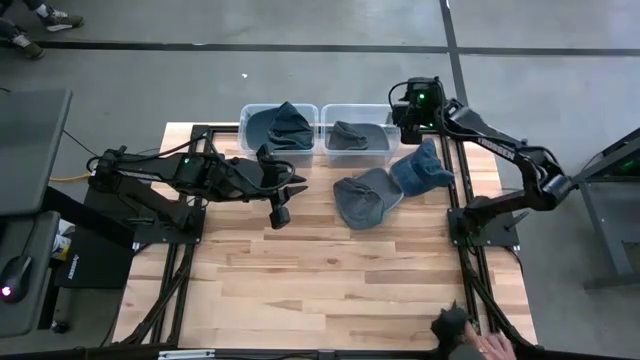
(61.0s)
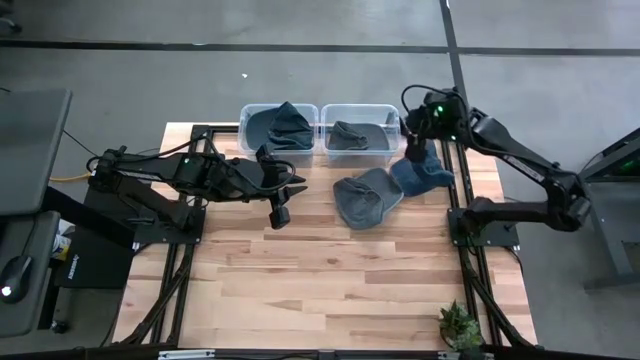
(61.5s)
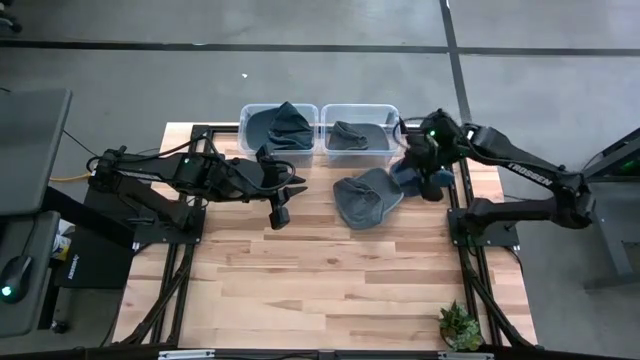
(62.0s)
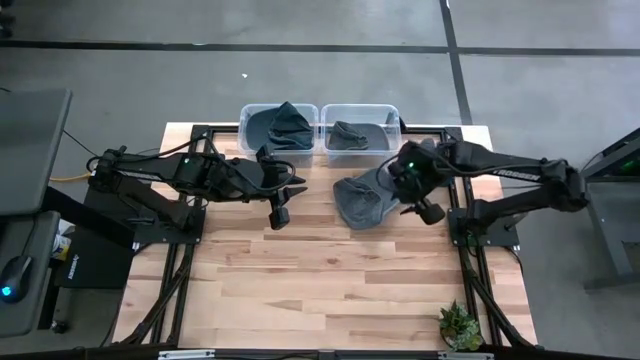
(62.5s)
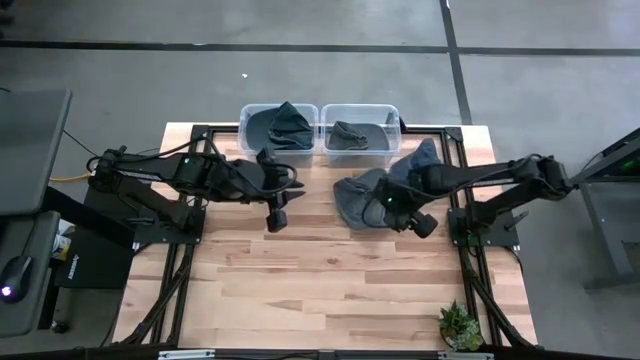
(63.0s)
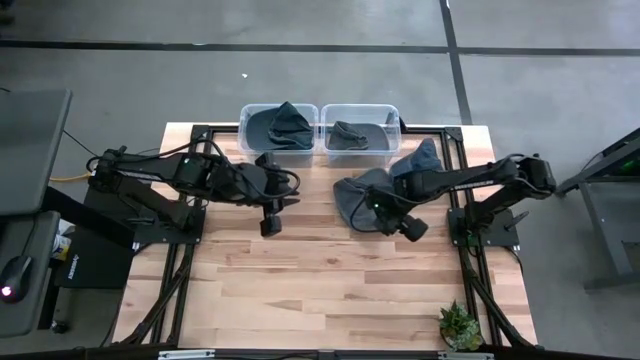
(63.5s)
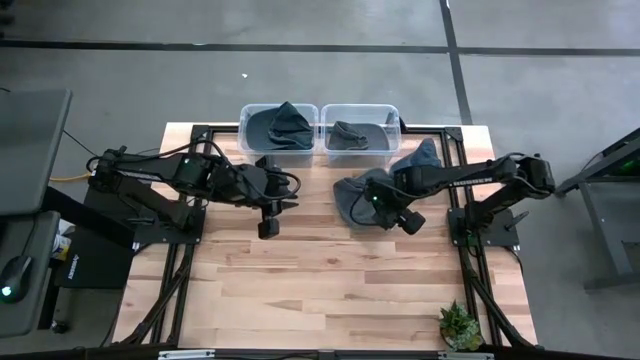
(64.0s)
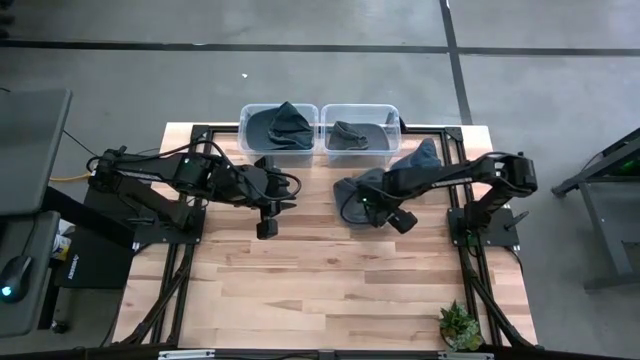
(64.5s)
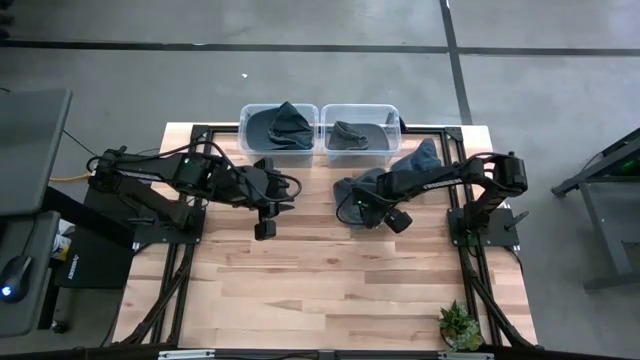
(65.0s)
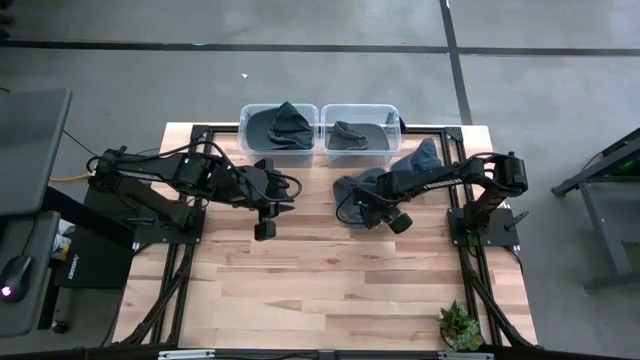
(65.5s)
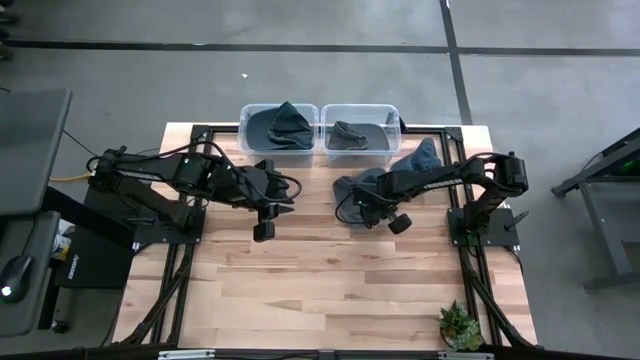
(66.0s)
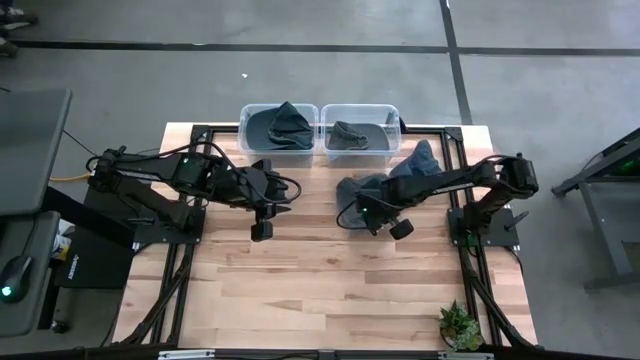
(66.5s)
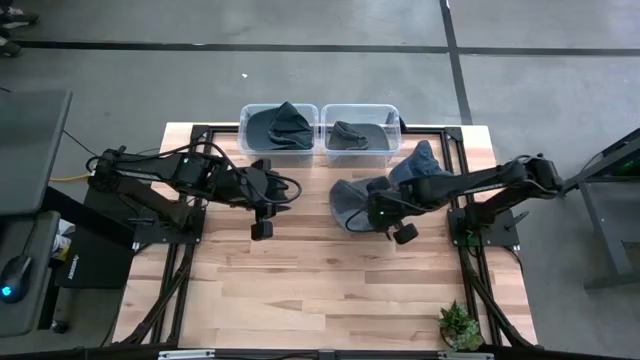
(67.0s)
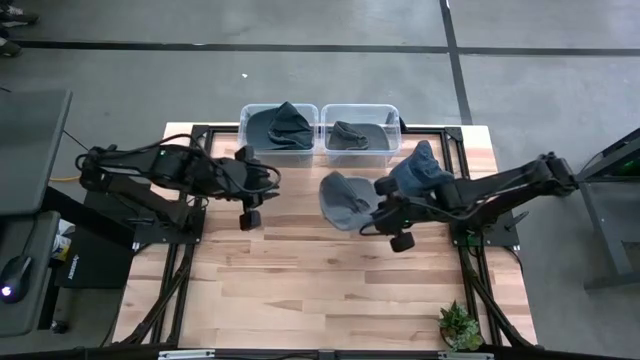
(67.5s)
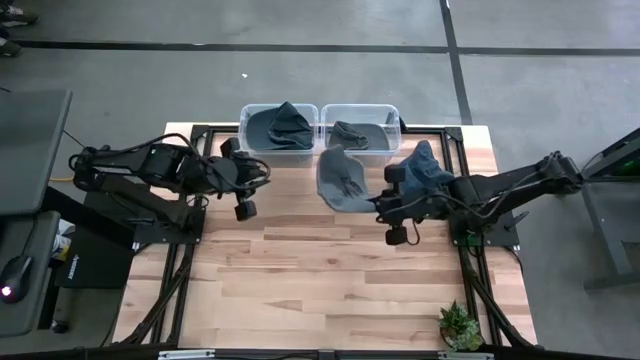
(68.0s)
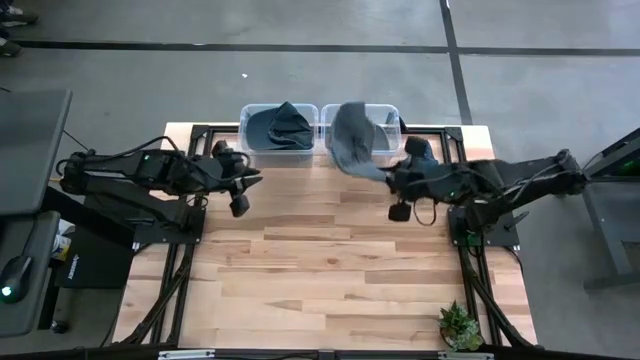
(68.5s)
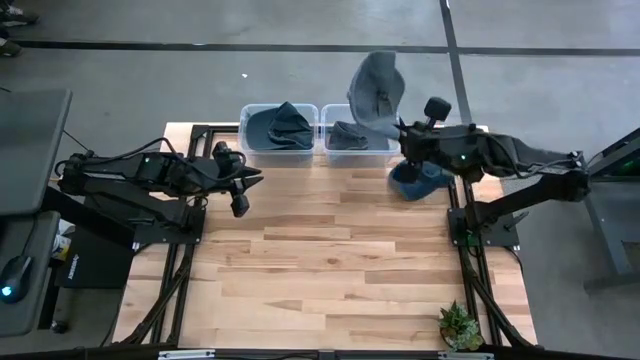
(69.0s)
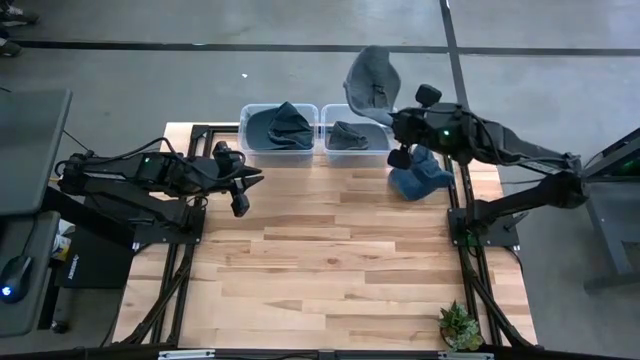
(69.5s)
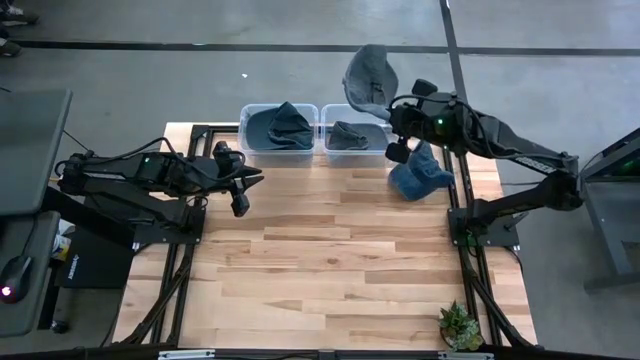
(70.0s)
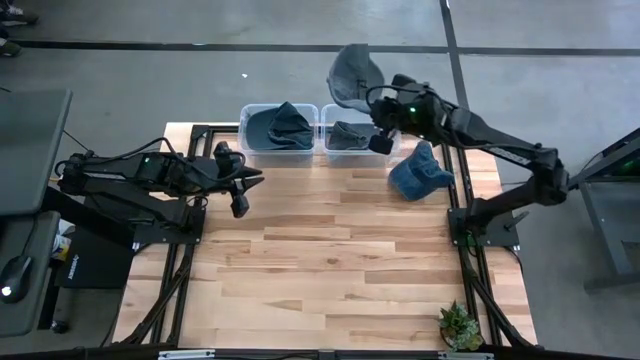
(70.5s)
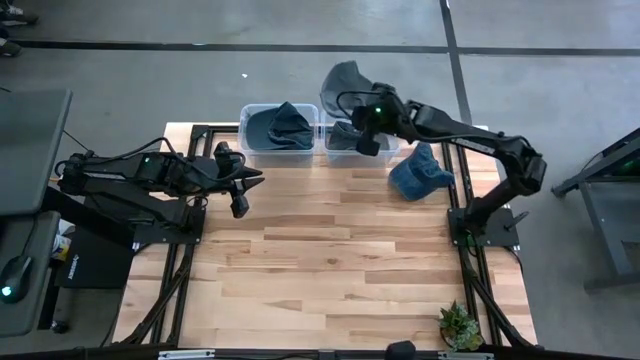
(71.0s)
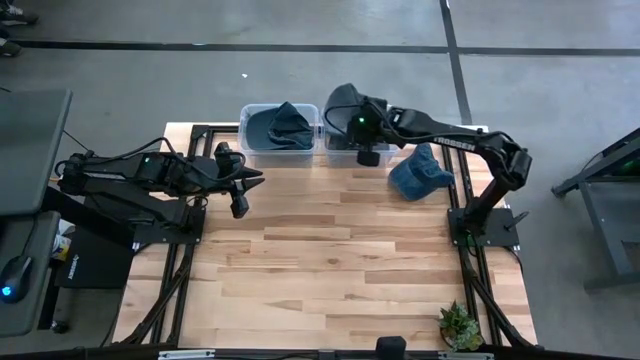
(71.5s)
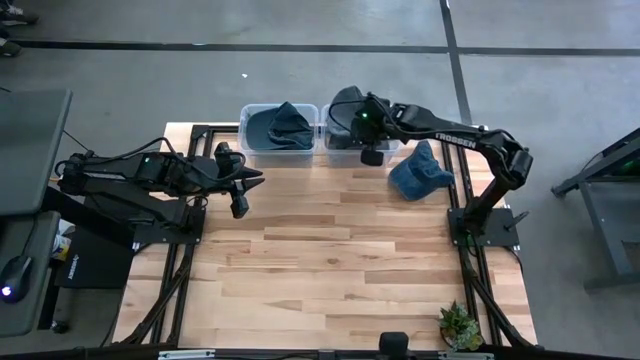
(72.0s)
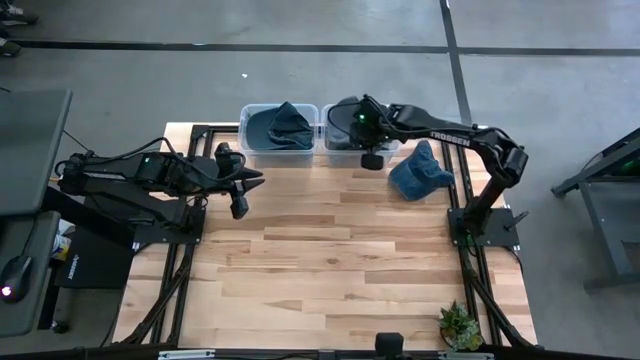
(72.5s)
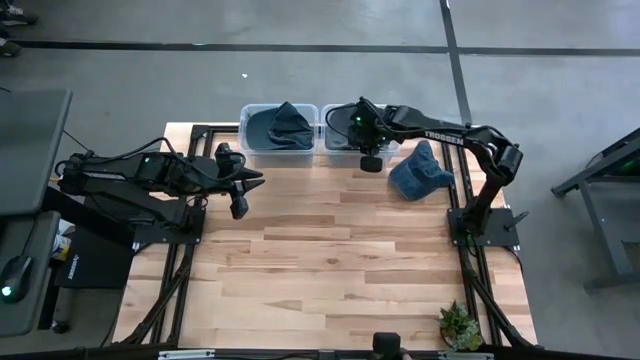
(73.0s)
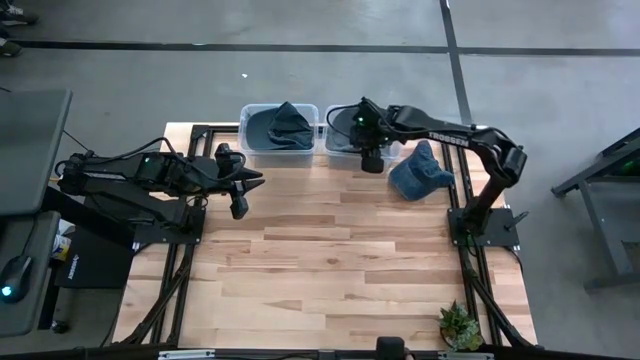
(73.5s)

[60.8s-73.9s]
Task: Pick and place caps into container
Put the gray cap into the right transparent container
